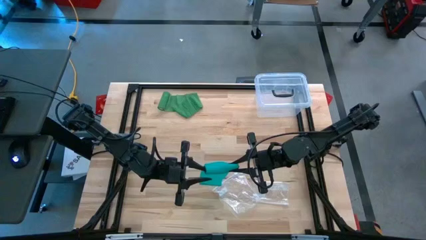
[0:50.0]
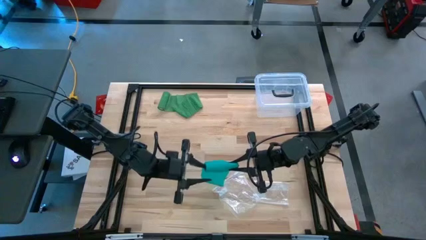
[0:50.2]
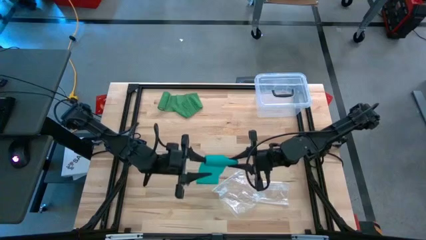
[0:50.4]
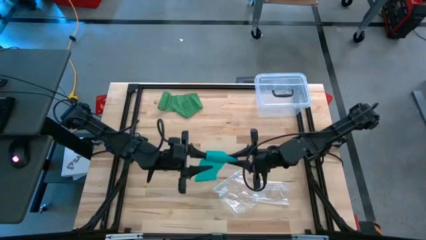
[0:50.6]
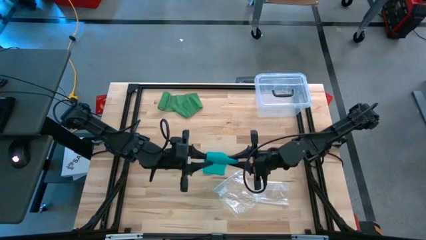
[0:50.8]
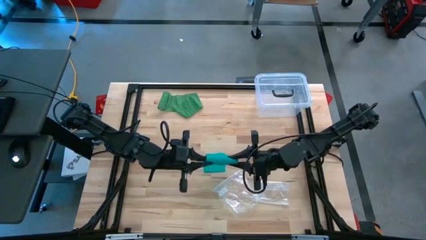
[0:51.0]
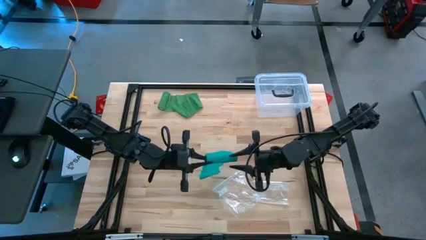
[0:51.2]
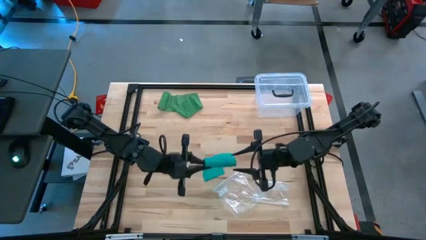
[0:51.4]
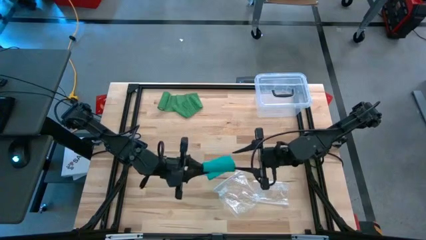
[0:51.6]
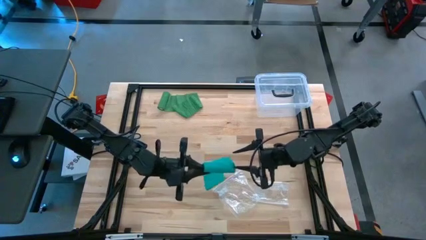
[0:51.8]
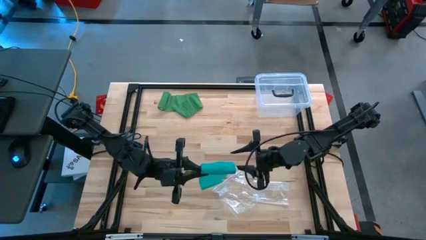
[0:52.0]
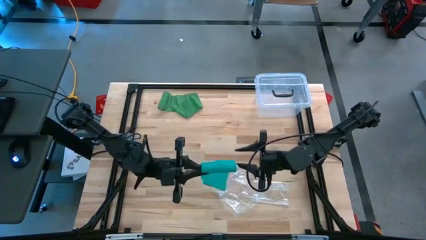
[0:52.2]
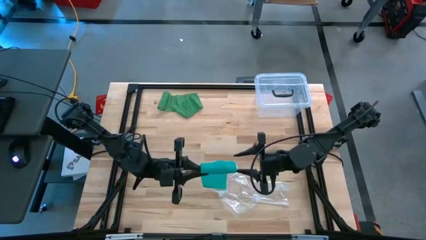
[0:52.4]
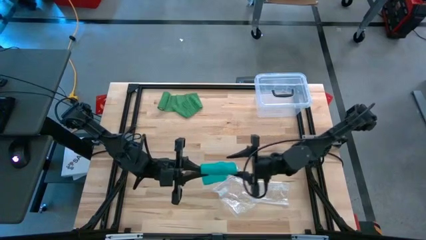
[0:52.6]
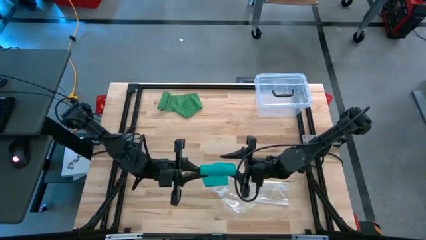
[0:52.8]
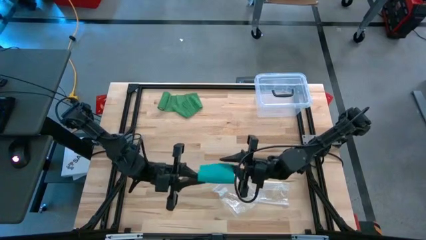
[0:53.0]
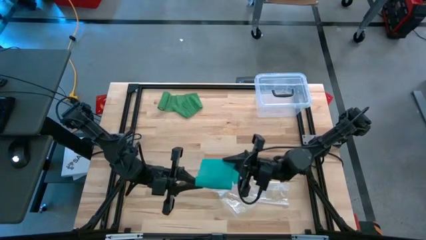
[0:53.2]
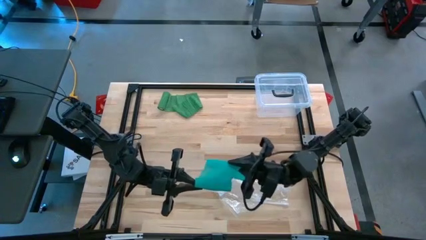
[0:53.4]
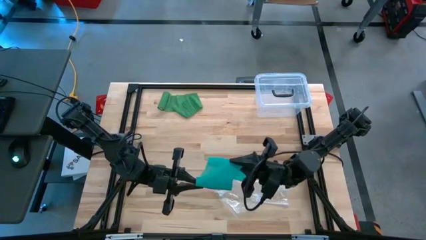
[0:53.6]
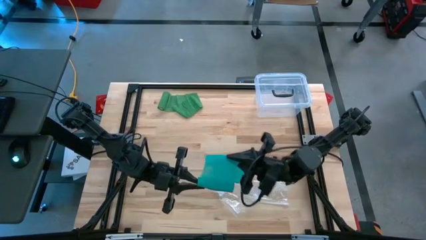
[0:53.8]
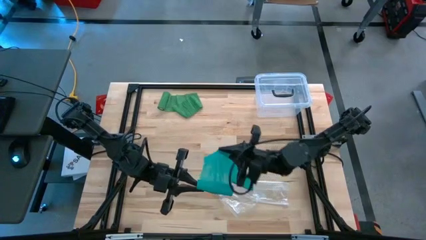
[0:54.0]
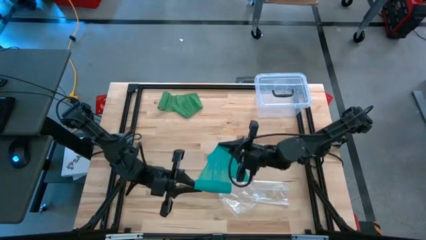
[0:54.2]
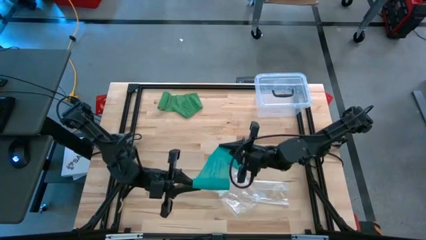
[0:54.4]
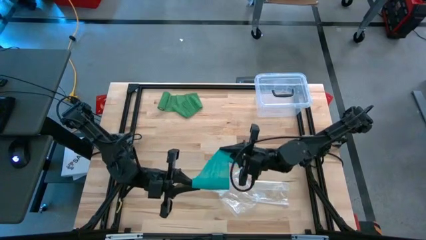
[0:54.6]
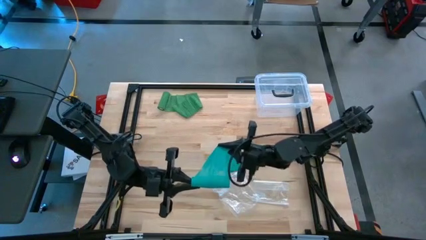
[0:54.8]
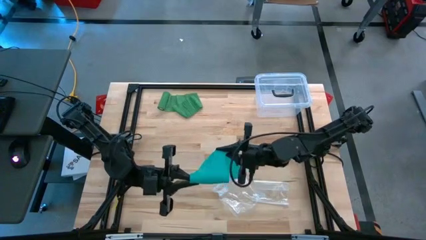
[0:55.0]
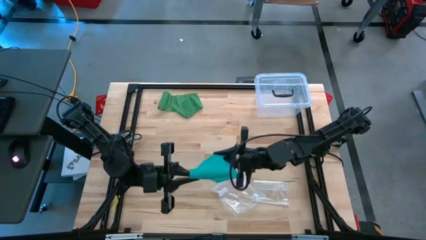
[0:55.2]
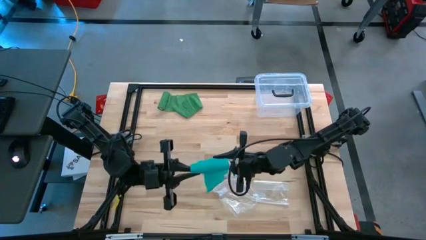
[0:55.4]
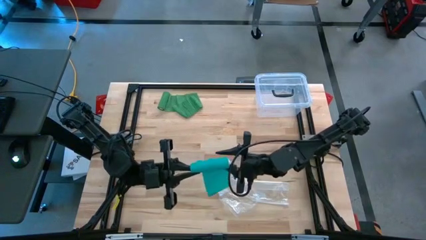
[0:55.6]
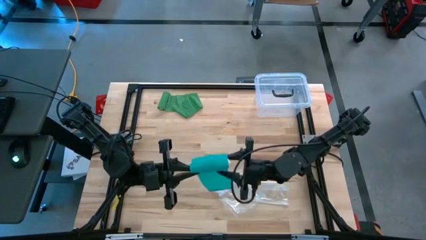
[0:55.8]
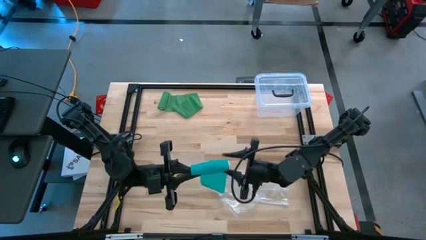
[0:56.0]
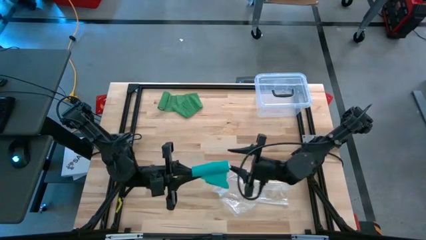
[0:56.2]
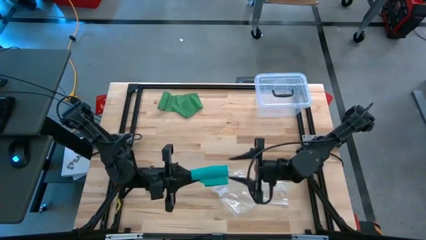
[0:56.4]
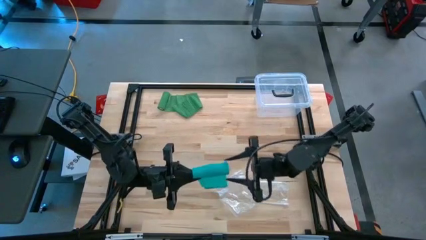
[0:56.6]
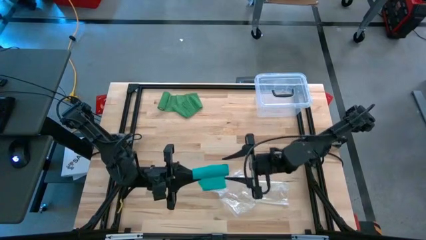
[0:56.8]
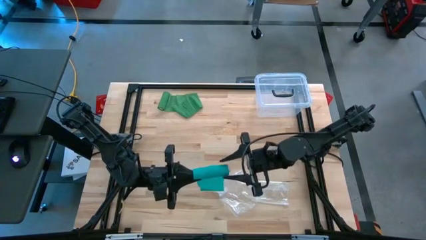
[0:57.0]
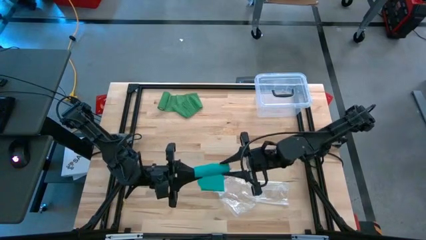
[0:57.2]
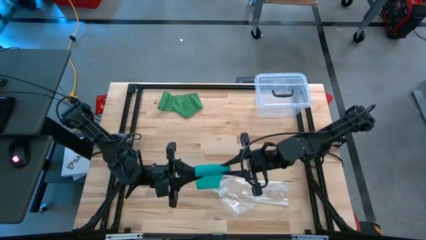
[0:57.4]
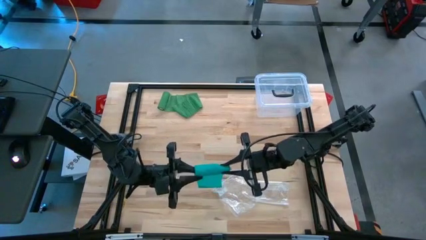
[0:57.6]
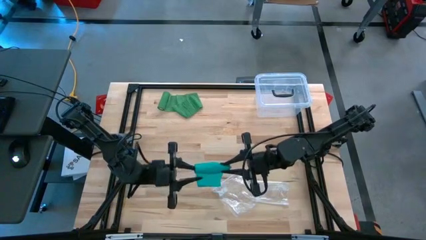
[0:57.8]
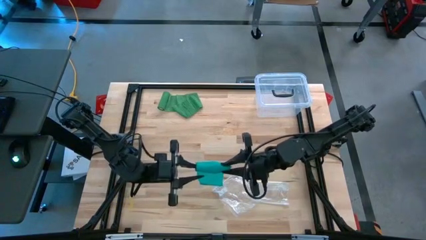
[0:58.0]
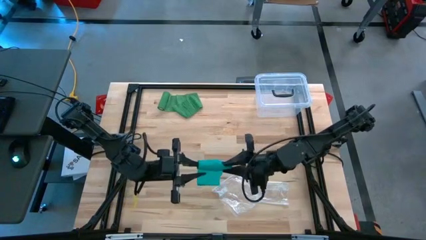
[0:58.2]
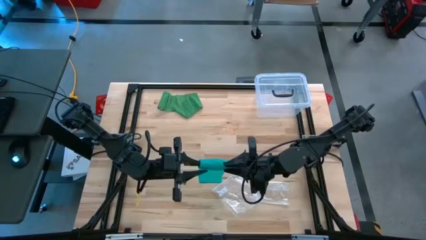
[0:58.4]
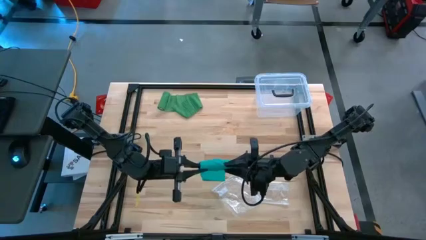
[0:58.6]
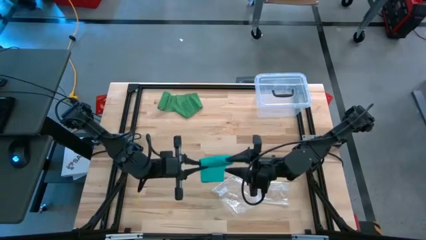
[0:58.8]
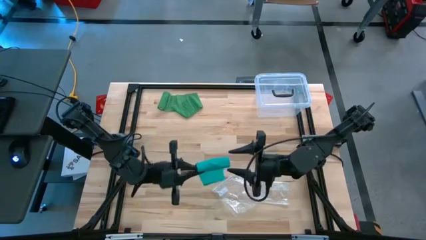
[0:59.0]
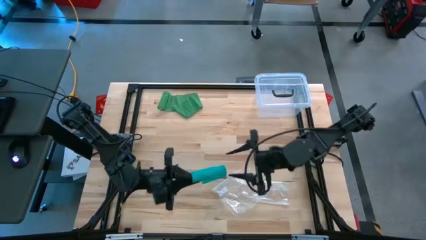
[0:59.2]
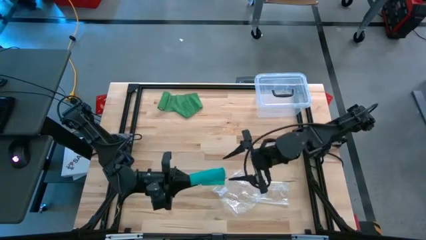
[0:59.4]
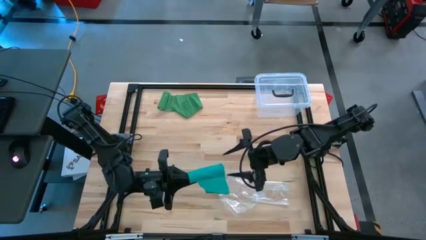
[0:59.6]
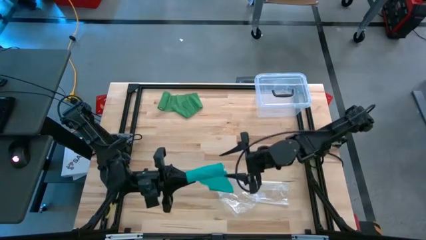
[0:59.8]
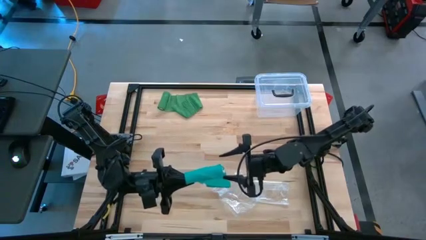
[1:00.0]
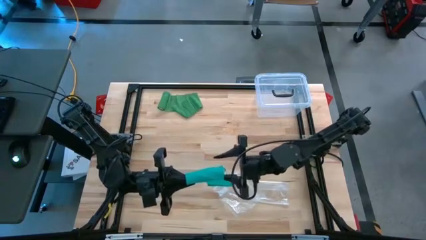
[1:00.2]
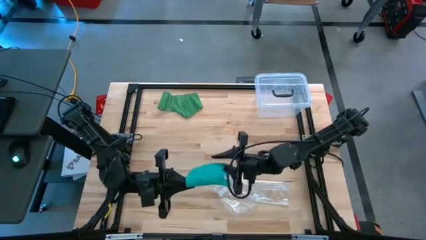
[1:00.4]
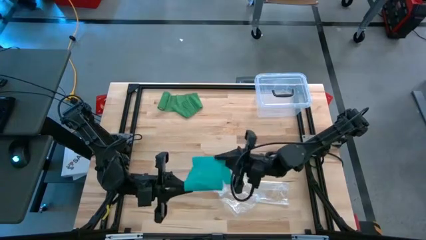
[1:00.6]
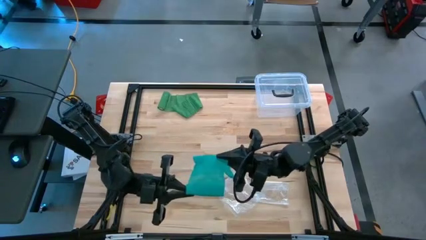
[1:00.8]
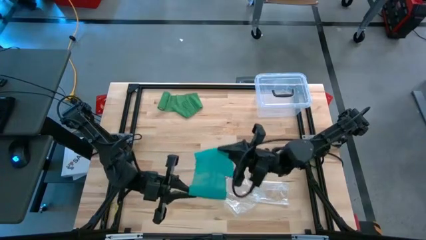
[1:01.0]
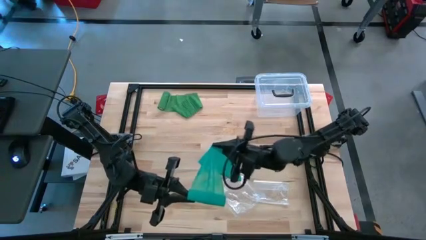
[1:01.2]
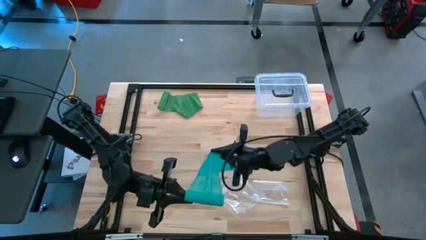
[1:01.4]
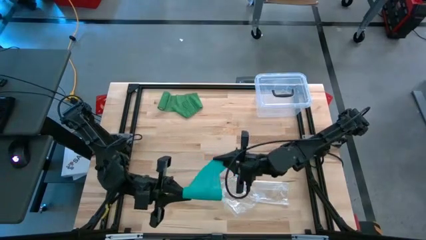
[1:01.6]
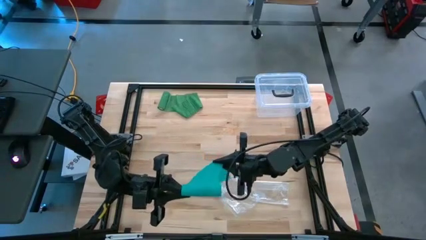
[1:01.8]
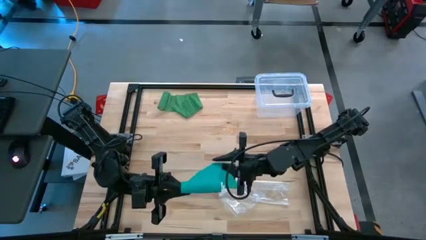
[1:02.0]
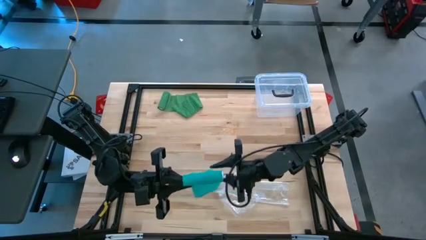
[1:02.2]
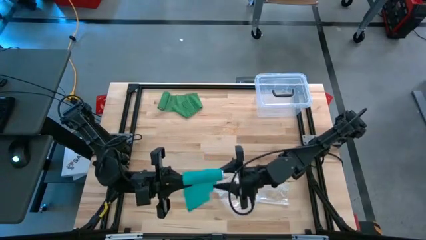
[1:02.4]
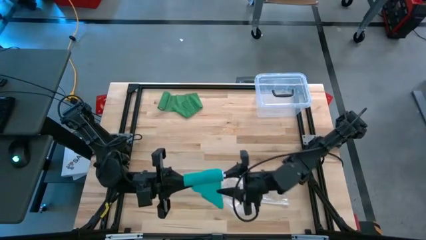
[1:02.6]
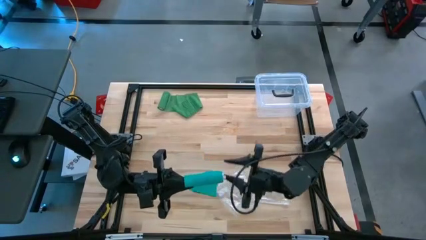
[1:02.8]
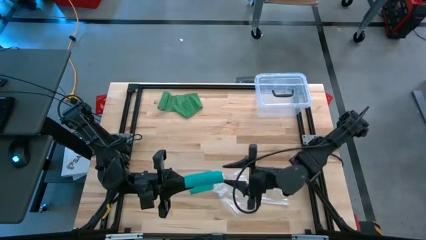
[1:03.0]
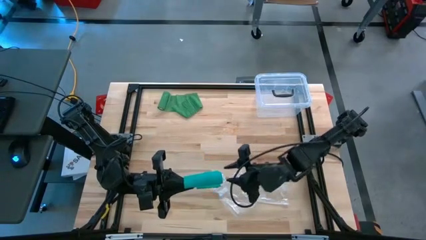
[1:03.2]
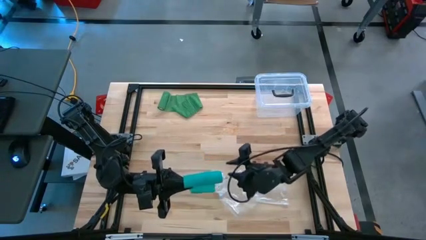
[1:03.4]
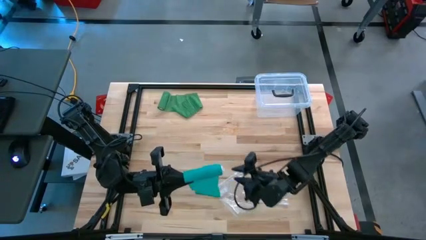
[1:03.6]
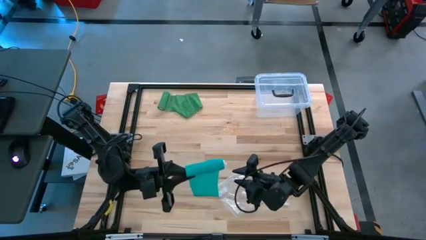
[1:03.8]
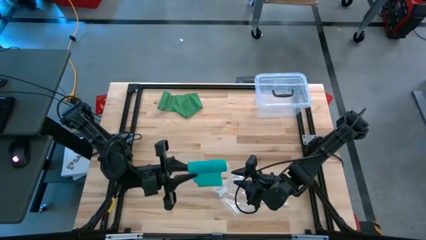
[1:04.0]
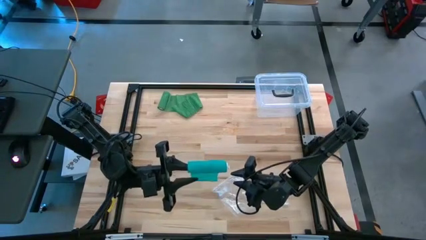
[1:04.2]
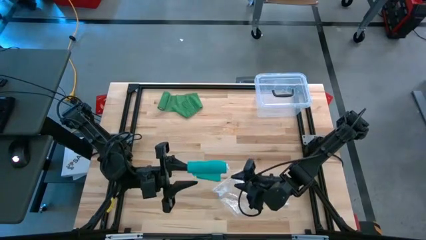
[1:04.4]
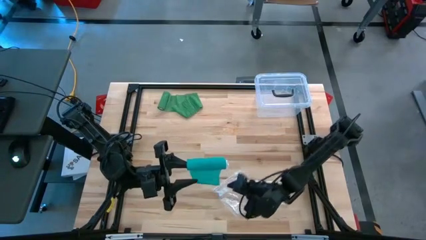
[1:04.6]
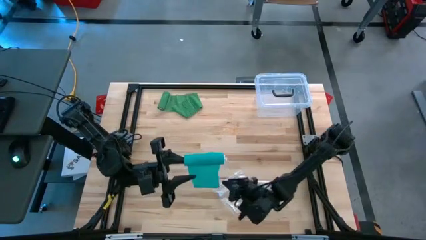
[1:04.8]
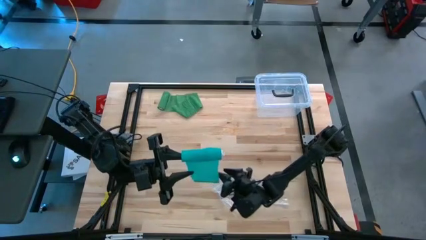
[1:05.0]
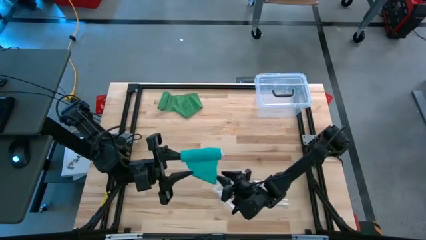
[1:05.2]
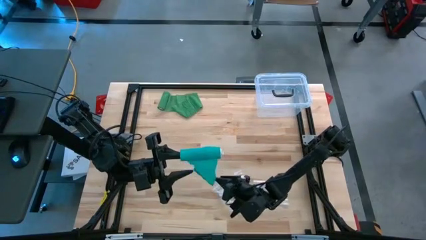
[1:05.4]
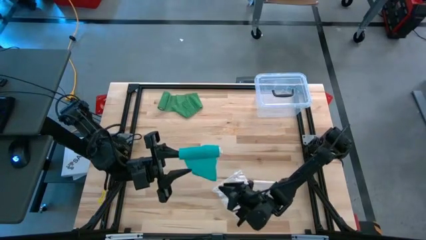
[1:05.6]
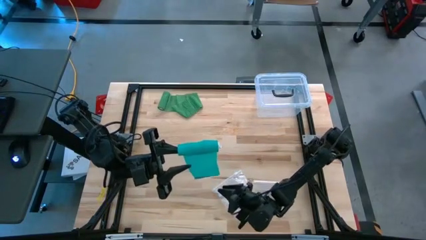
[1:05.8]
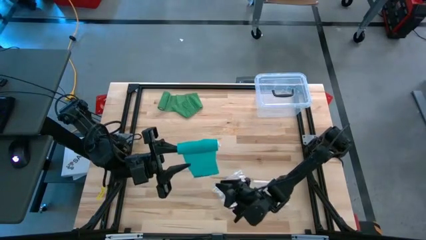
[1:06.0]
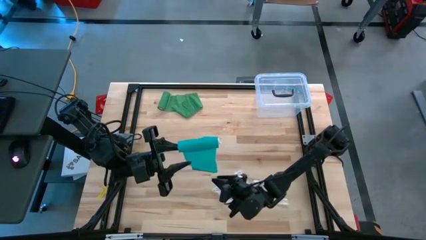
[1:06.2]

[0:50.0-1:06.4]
Task: Roll bandage
Roll the blue bandage
